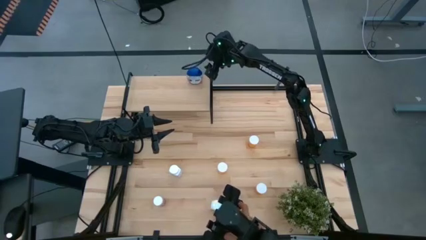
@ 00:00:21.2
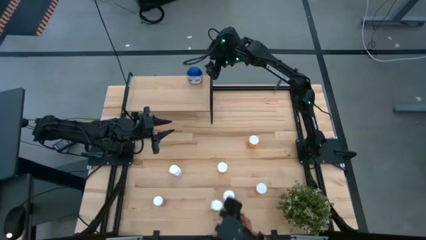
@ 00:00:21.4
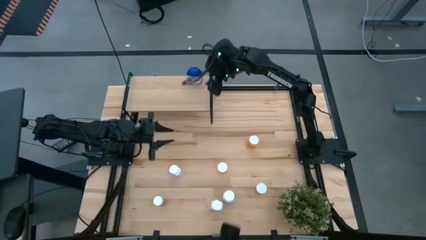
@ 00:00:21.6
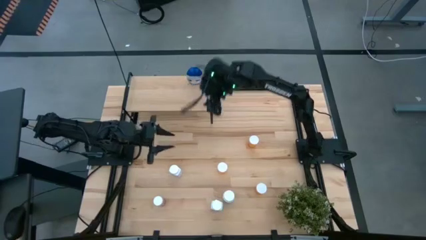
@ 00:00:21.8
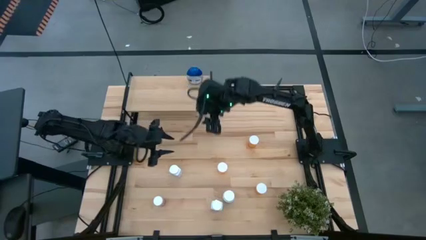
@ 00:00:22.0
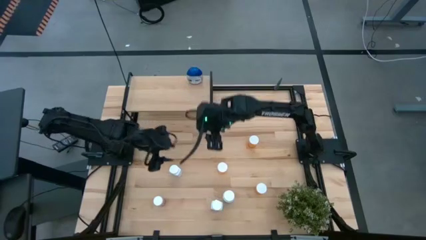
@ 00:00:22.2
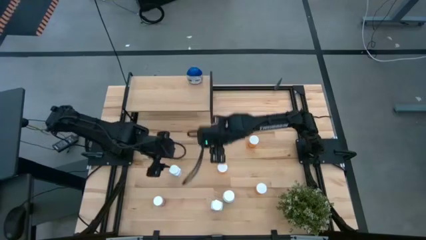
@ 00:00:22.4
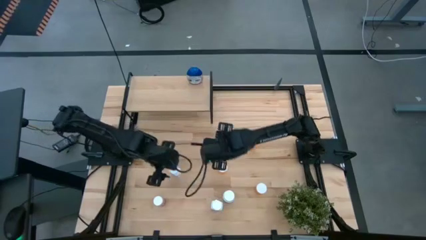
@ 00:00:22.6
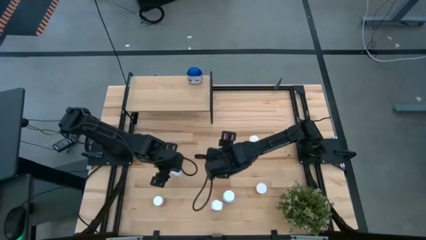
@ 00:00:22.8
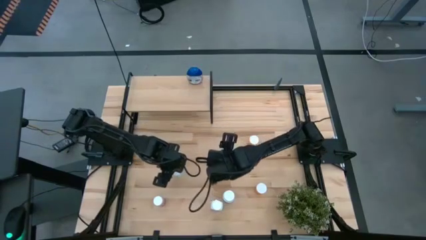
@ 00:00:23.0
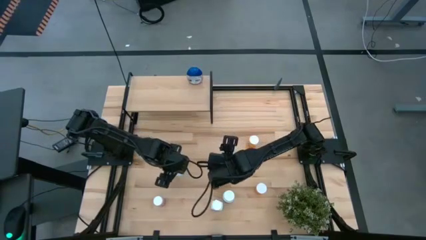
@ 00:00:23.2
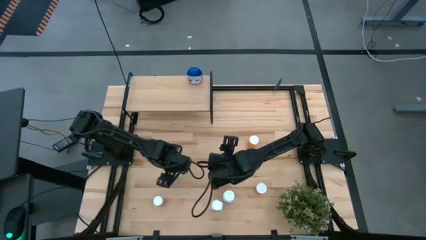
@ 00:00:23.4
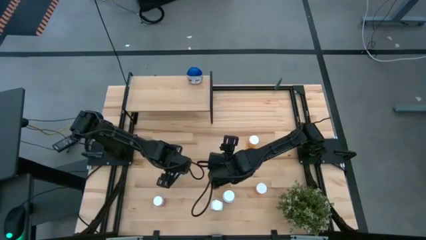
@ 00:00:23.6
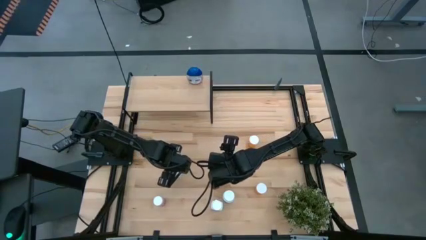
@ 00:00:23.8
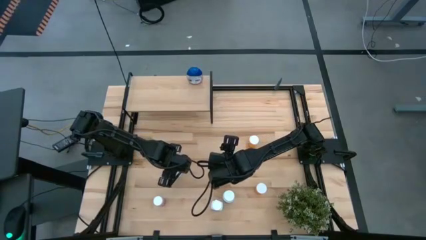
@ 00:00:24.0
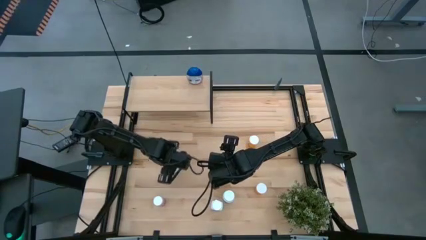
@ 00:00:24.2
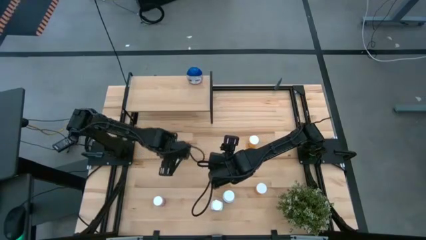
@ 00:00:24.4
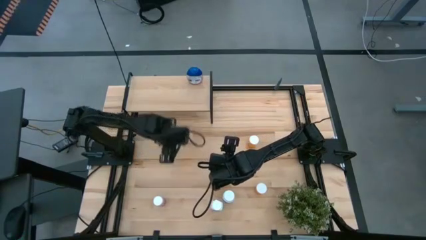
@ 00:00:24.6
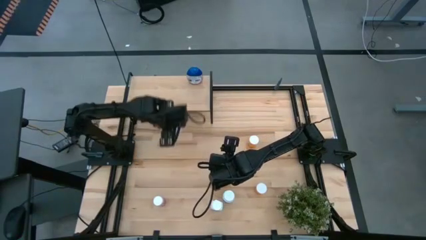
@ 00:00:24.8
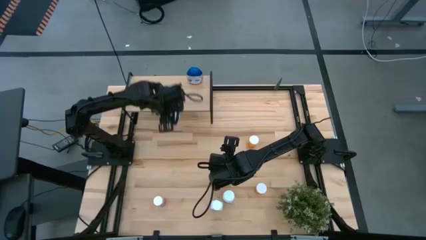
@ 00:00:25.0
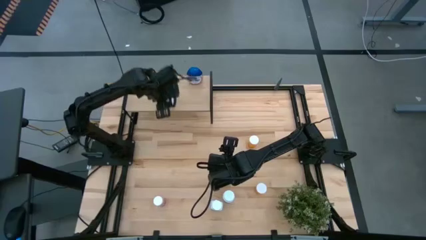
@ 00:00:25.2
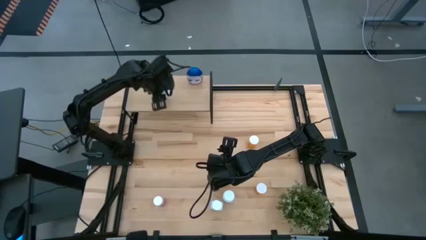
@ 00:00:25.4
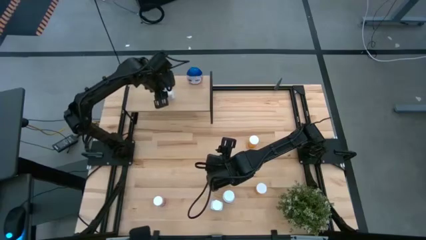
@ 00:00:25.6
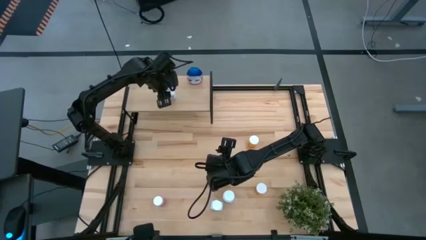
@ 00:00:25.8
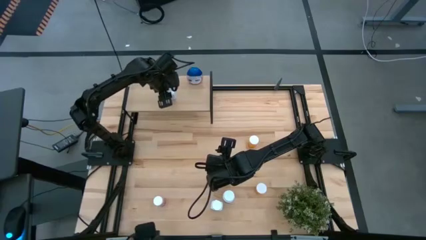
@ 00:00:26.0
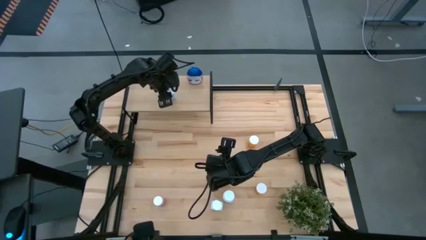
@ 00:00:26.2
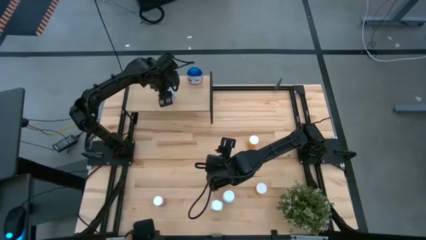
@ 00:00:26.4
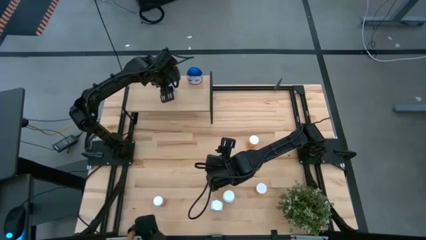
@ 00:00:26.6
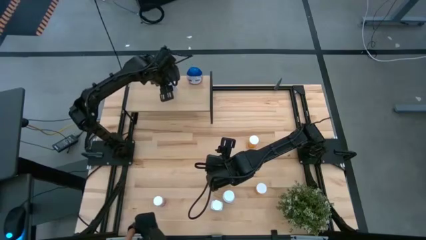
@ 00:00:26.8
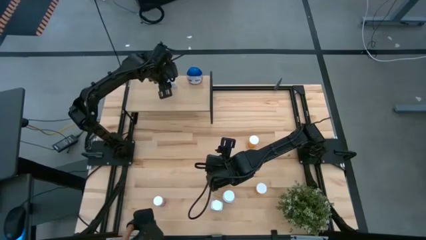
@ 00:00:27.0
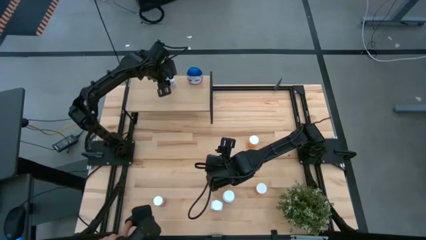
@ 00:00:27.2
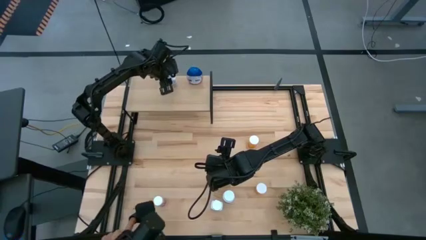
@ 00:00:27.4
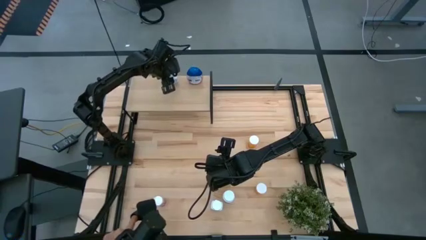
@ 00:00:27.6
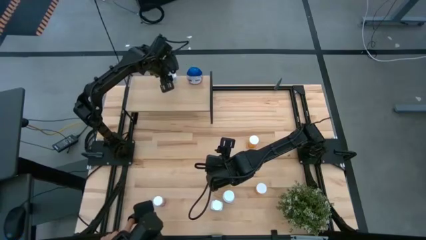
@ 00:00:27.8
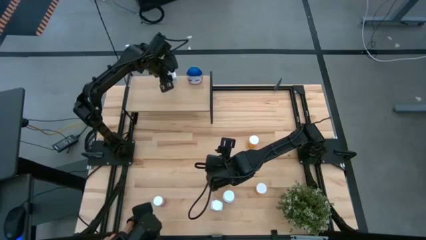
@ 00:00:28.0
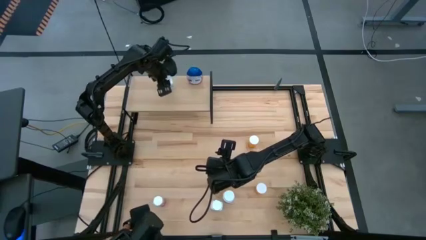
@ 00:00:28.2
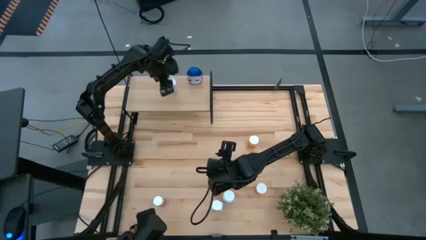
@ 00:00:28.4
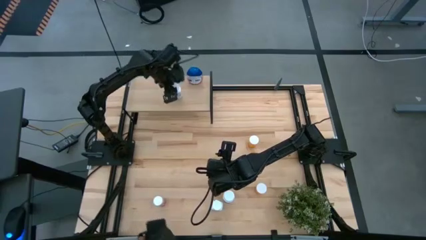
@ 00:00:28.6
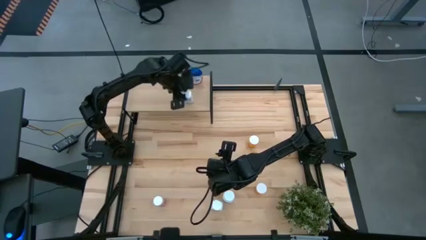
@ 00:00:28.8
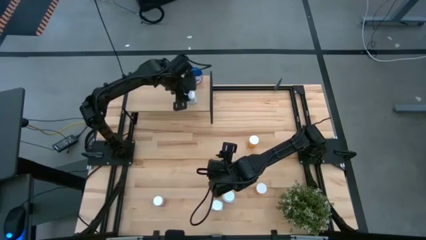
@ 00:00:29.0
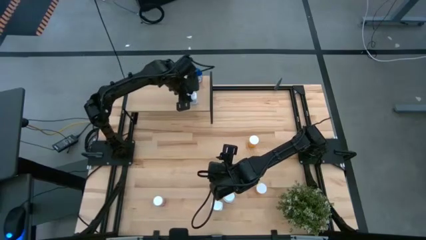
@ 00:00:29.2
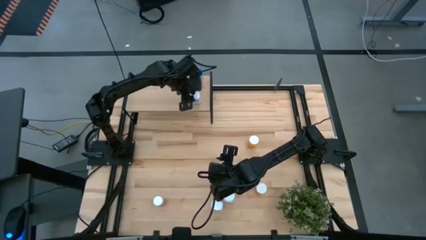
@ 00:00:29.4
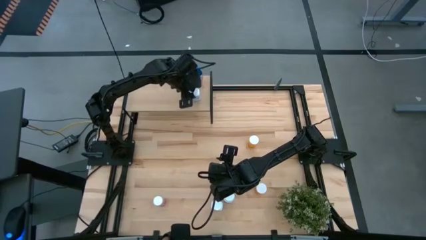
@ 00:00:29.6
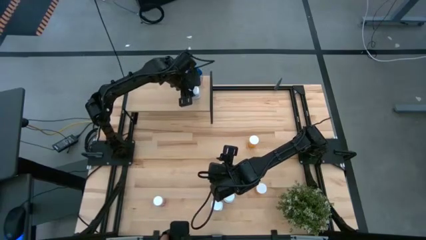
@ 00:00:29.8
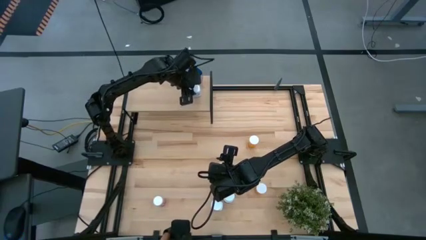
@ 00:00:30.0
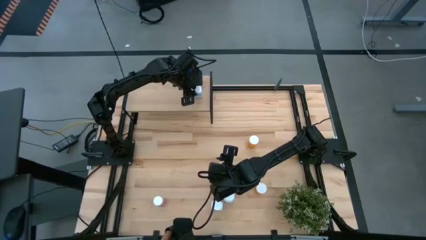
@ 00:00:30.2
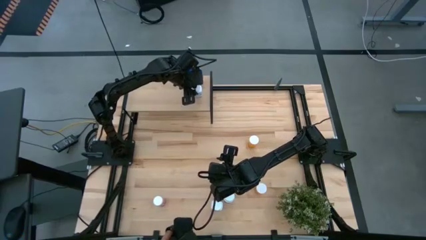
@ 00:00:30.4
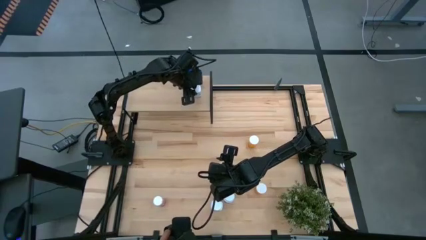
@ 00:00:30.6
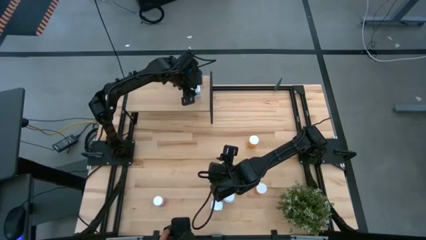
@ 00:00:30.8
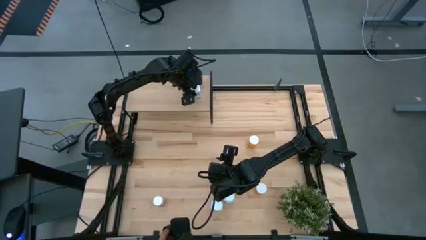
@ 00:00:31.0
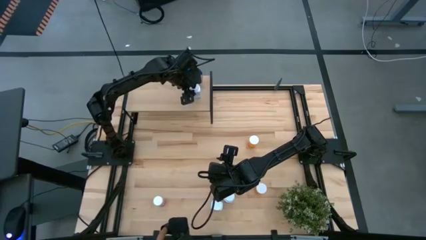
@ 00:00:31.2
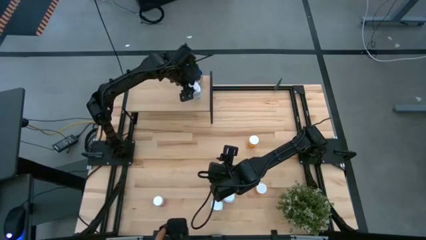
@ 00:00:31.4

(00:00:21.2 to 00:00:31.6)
Task: Pick and place medicine bottles onto shelf by color
Put the top light blue pill bottle on the shelf
